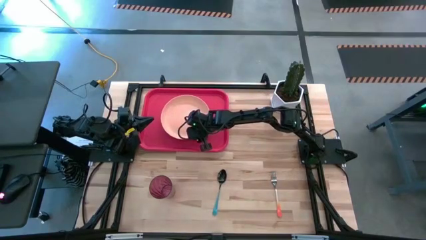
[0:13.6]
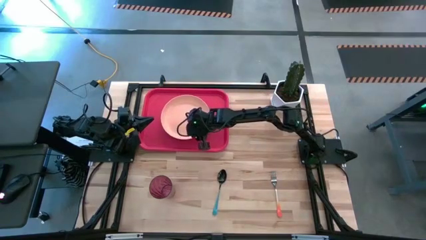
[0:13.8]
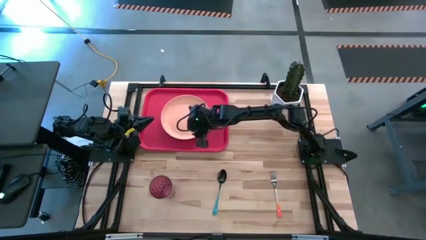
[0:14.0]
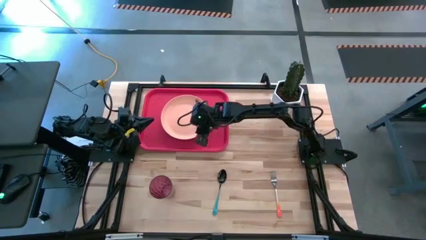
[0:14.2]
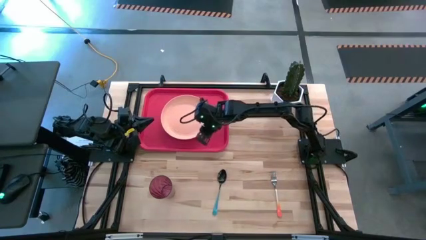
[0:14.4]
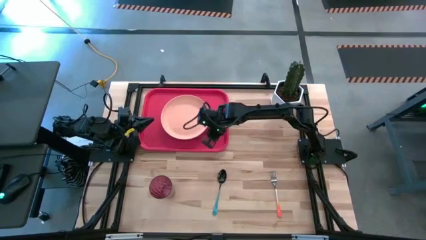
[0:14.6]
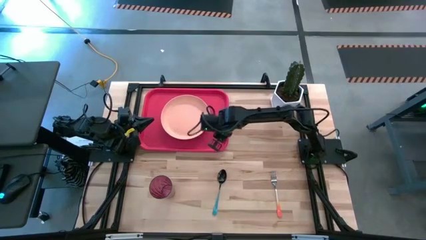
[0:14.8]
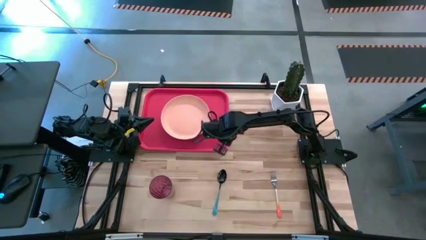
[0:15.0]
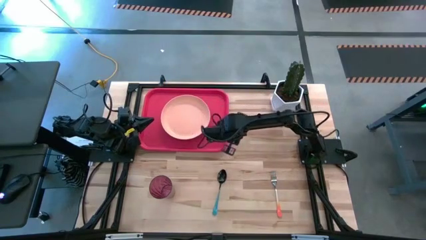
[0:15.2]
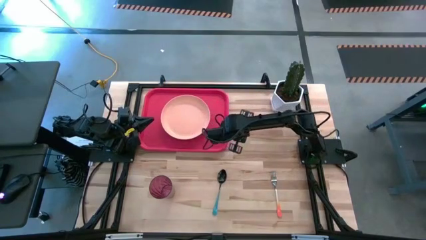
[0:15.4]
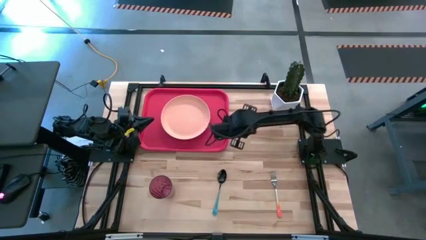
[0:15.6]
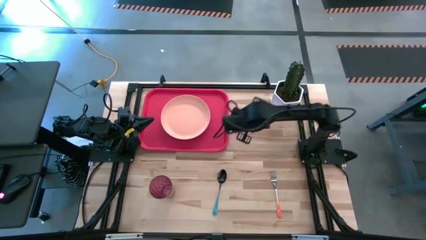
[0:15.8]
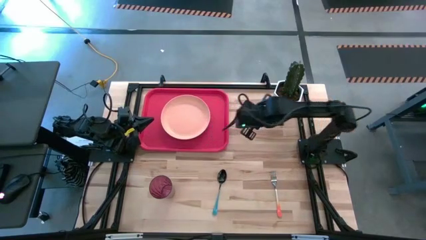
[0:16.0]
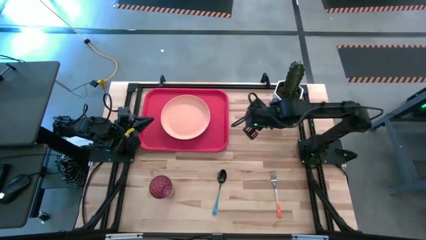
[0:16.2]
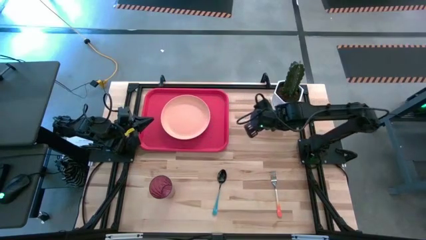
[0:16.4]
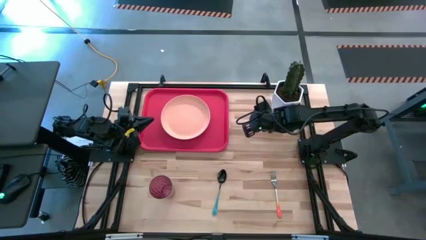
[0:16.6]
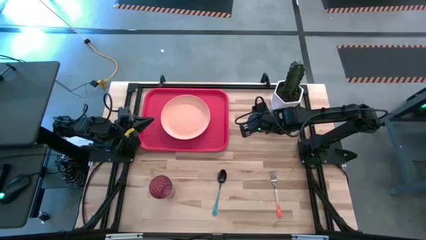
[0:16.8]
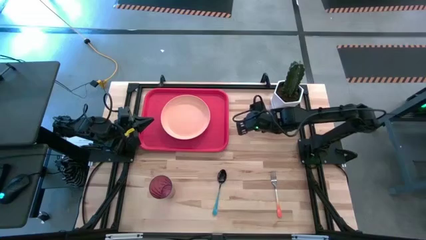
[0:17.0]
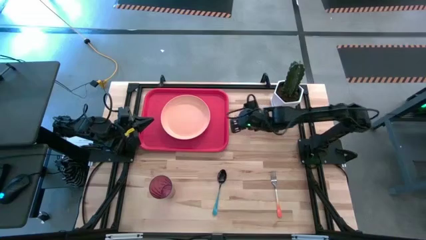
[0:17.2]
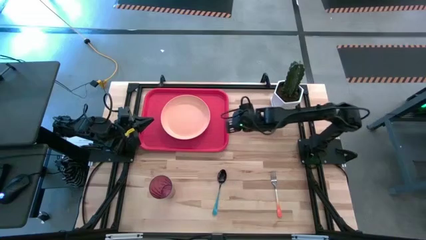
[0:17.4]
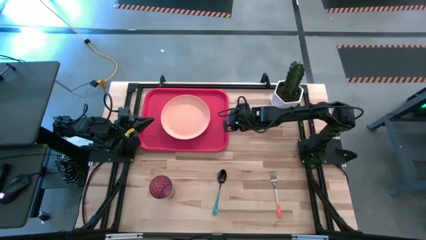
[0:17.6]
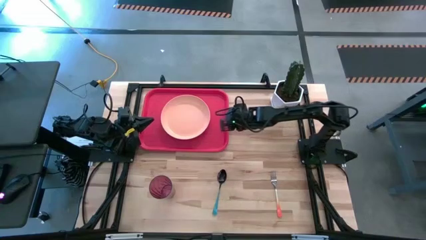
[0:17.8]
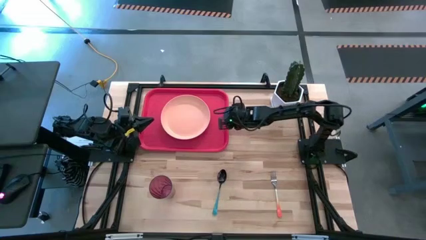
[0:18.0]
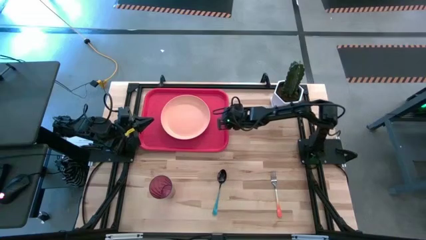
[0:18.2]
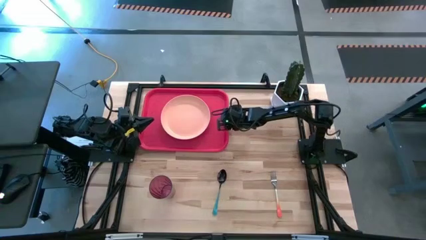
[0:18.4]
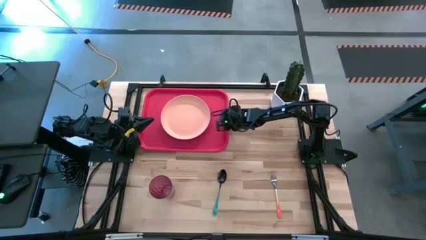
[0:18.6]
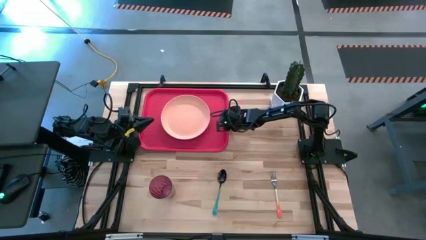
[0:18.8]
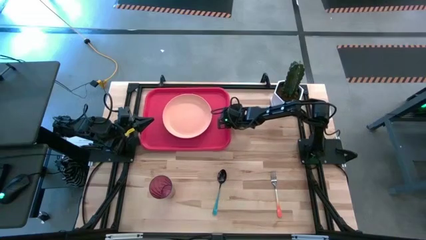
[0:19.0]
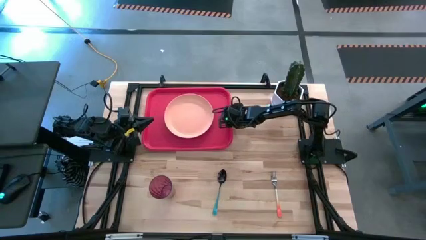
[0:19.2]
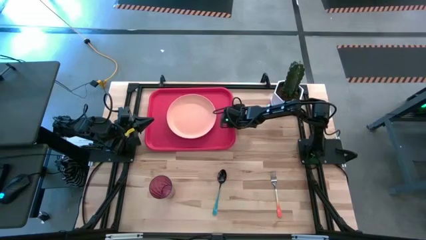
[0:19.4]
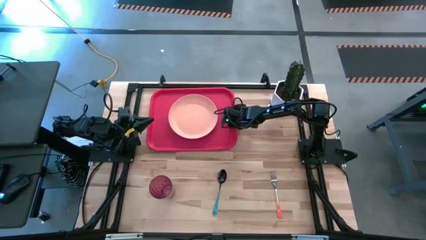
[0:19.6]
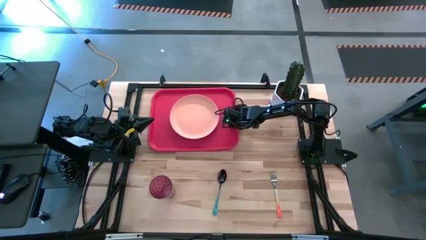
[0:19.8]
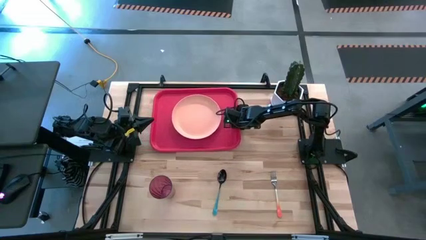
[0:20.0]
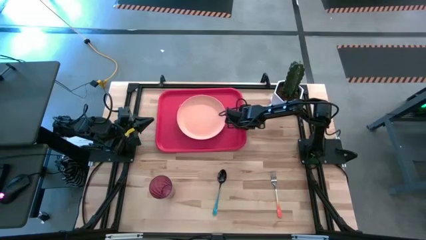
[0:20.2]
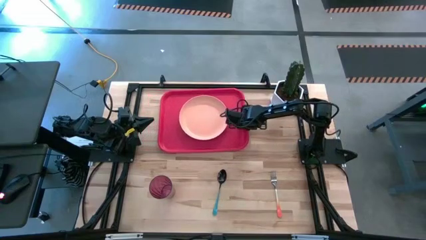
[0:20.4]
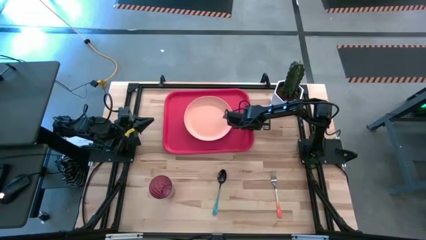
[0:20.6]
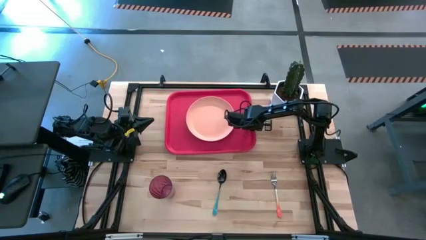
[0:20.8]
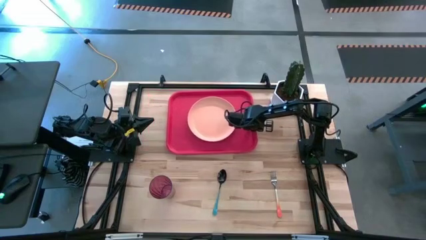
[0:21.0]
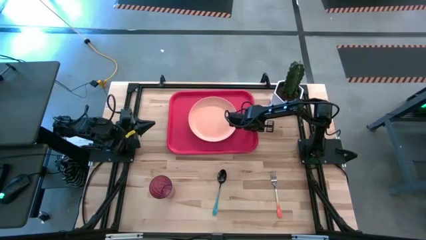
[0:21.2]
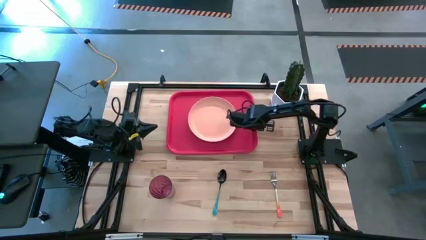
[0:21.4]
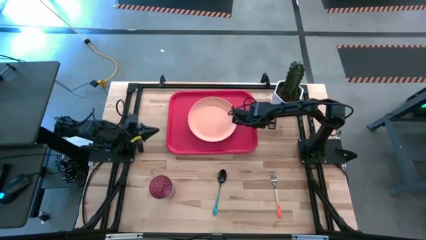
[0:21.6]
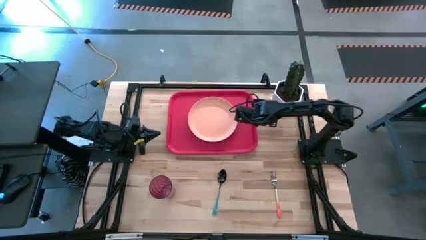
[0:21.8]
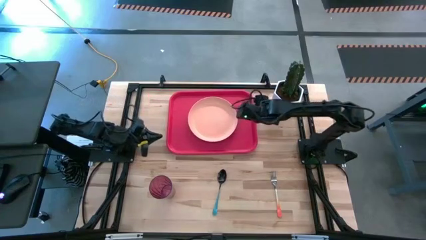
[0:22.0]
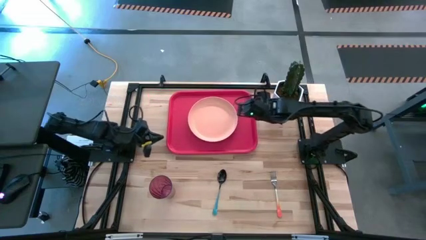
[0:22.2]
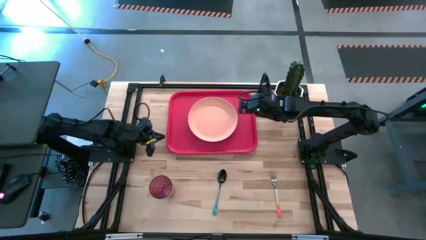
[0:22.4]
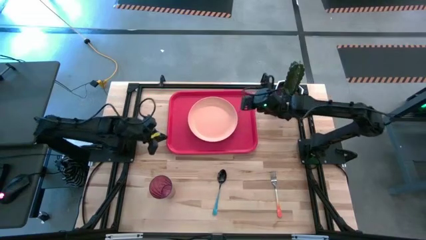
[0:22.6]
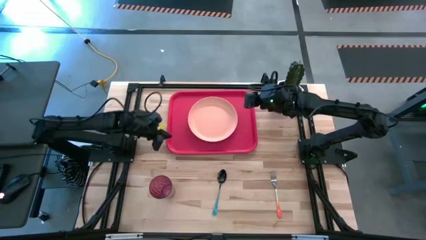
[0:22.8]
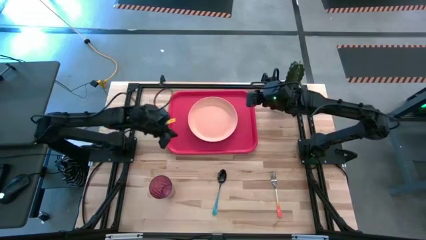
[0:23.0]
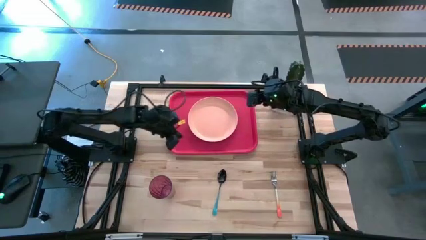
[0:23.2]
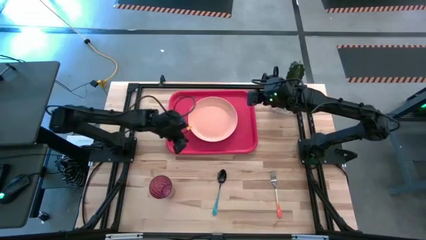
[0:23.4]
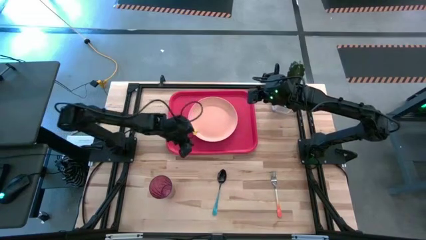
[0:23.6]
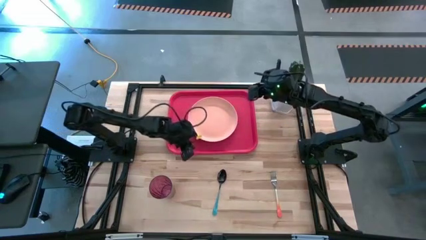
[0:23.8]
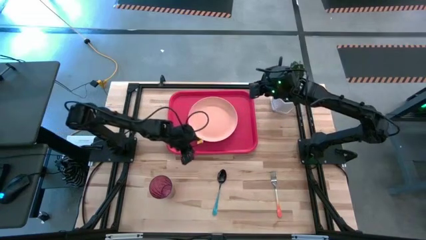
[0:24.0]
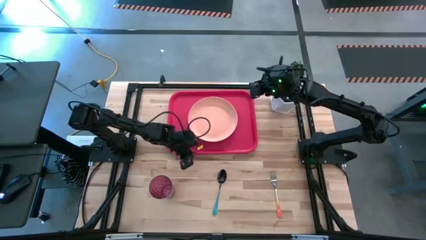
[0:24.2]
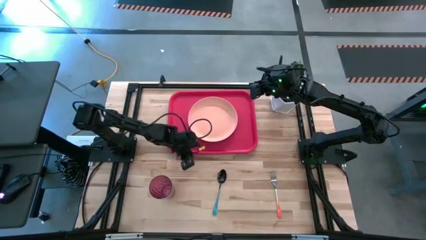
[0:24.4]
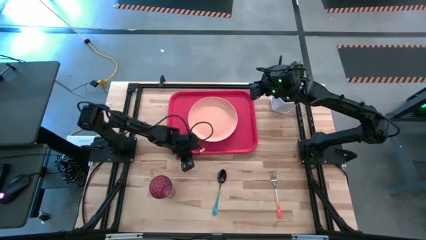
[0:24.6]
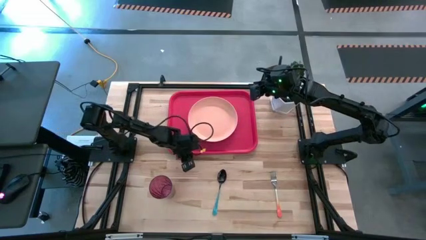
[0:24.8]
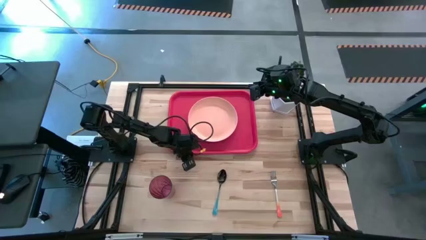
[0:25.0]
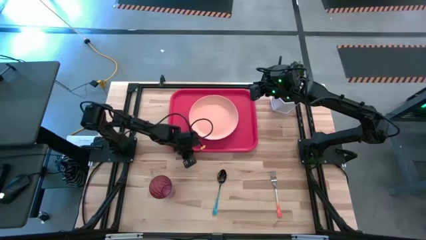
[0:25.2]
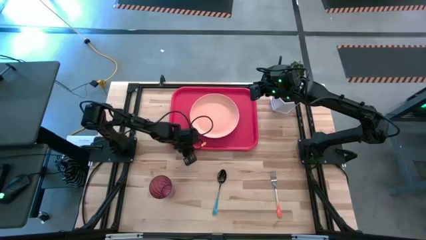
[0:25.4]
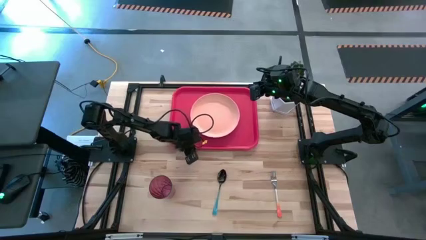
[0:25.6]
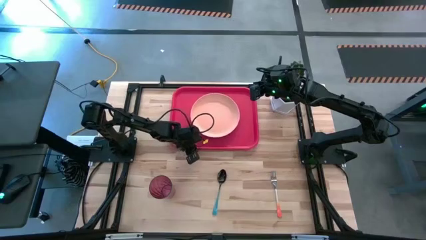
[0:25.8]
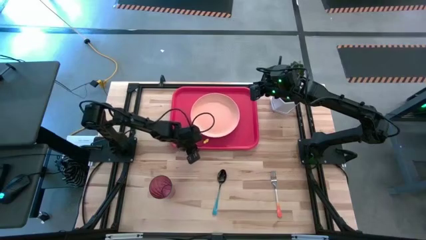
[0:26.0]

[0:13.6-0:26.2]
Task: Pick and place plate/cup/fork/spoon on tray
Move the red serving tray to the upper middle of the table

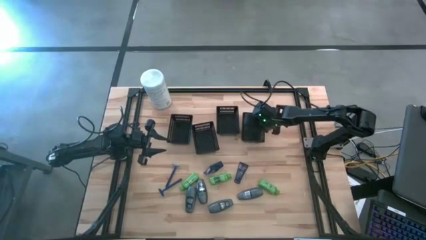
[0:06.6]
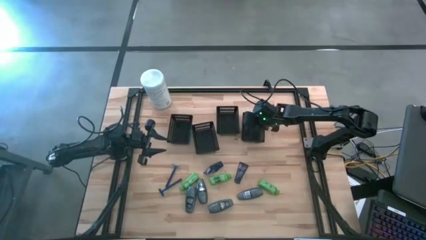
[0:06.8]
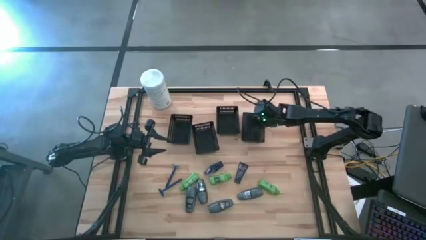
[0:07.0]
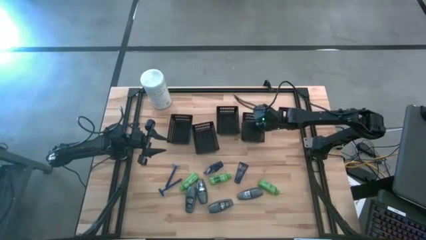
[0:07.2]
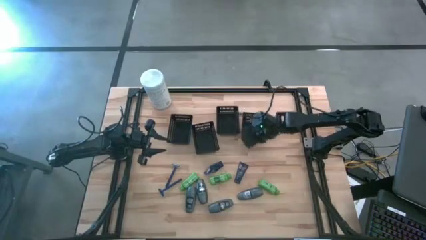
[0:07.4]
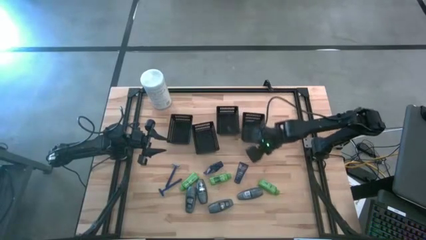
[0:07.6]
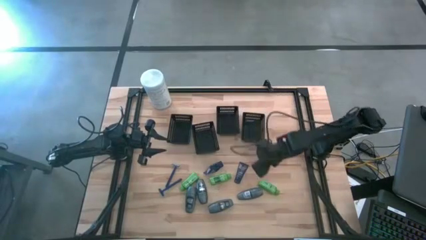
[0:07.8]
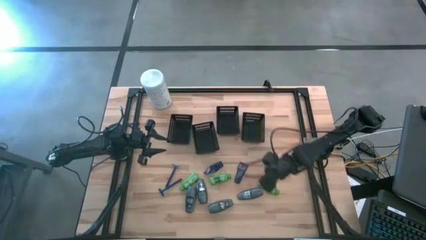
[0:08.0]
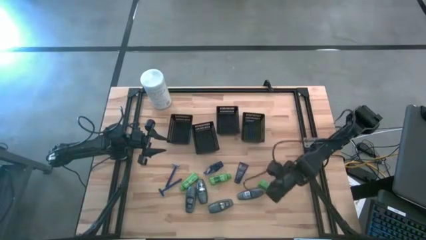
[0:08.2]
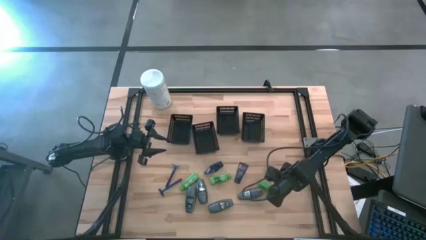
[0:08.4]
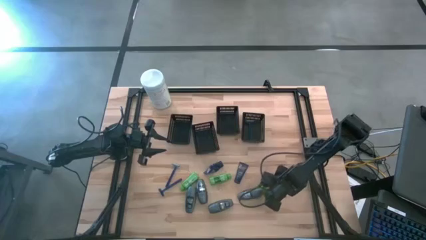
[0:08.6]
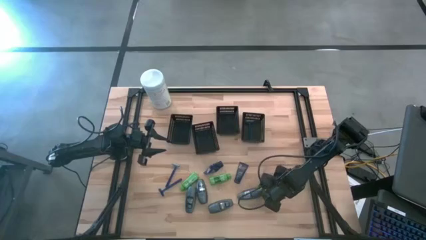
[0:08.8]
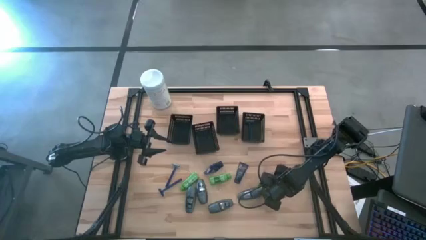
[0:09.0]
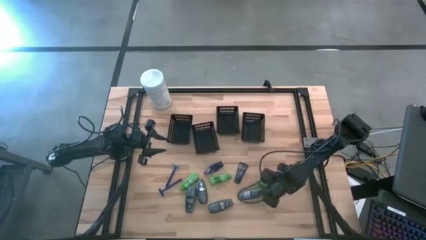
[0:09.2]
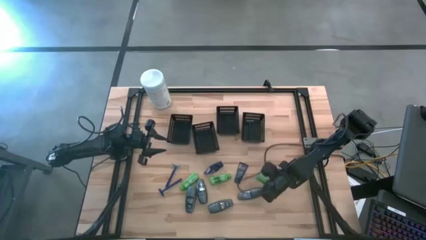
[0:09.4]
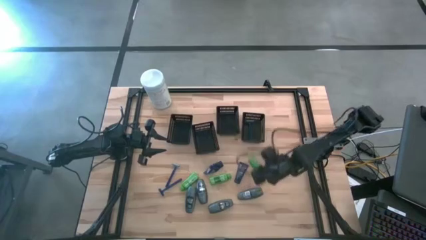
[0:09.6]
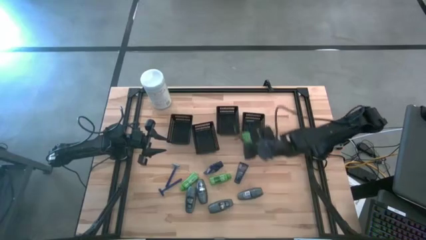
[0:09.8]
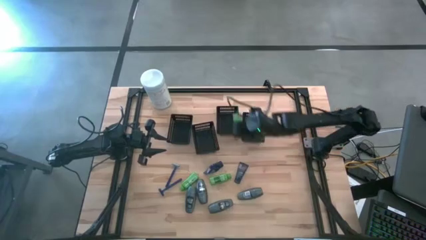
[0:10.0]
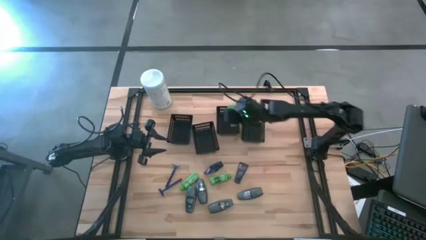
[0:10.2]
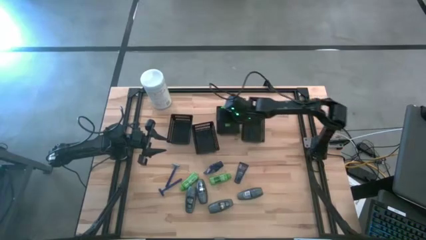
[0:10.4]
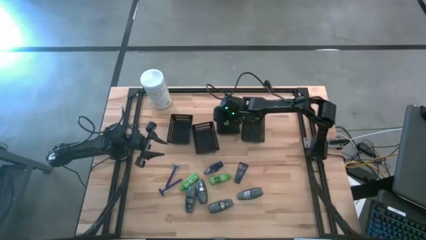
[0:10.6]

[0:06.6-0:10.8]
Task: Pick & Place Travel size toiletries
Put the right shampoo bottle into the middle right bin
